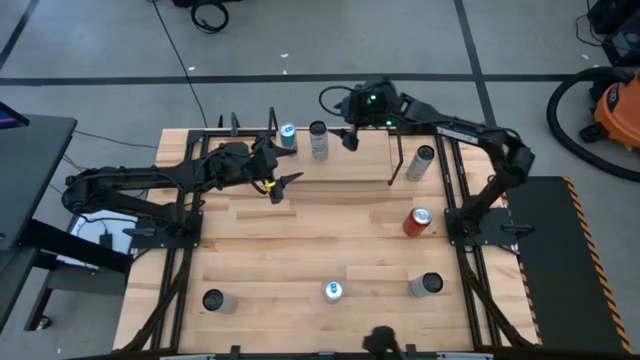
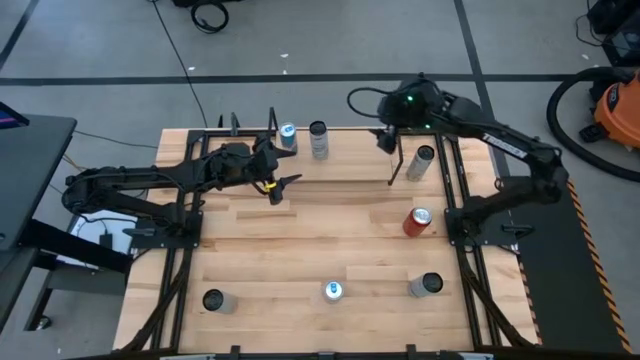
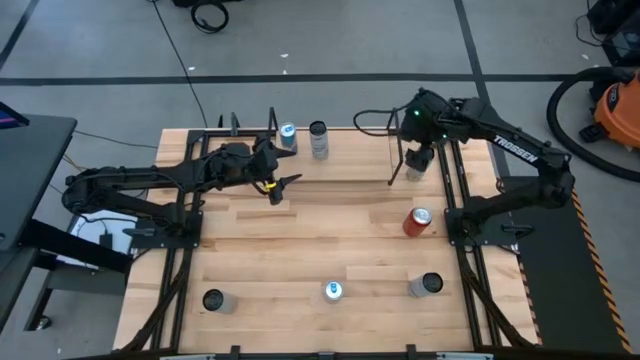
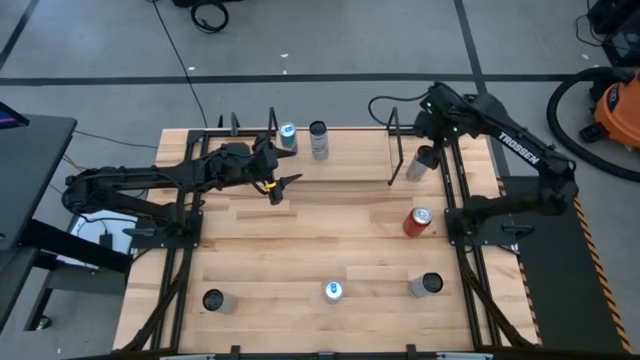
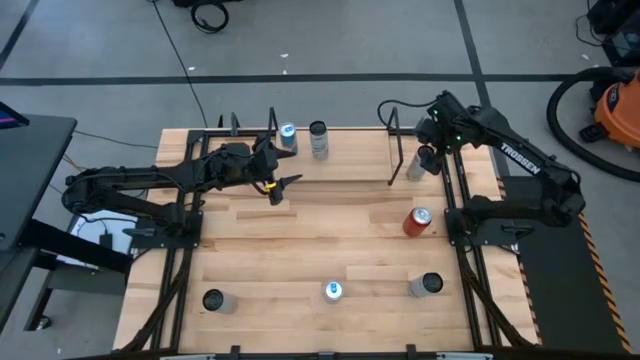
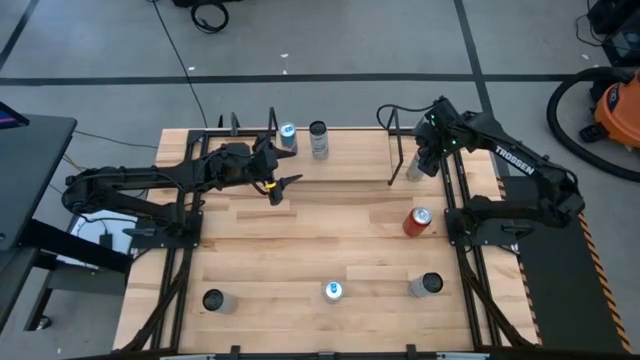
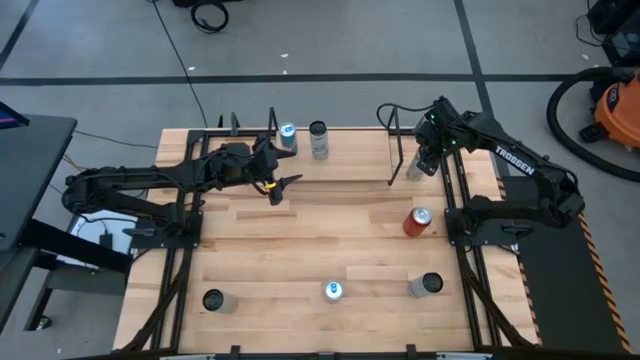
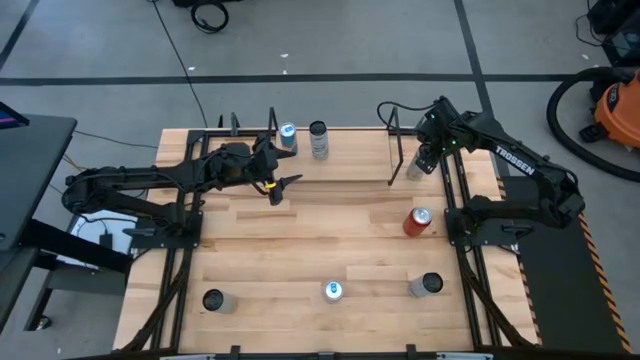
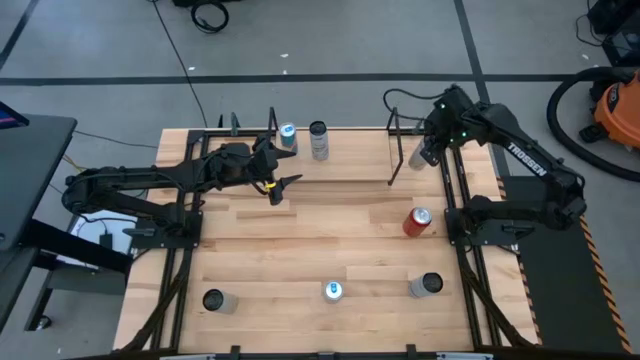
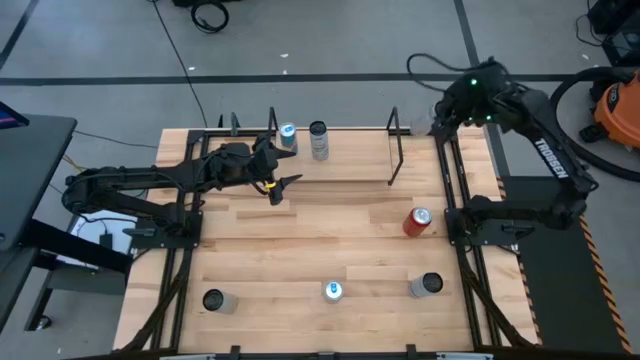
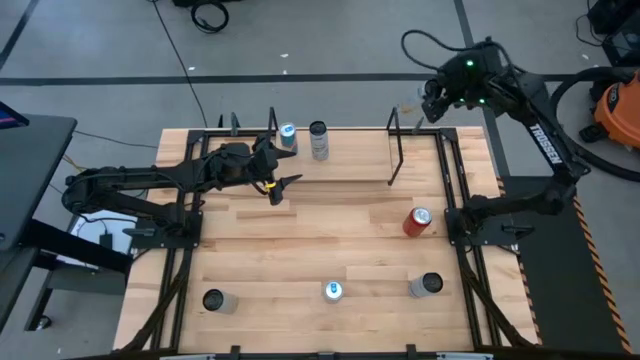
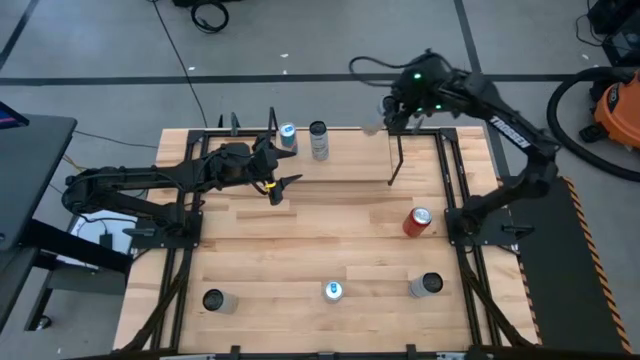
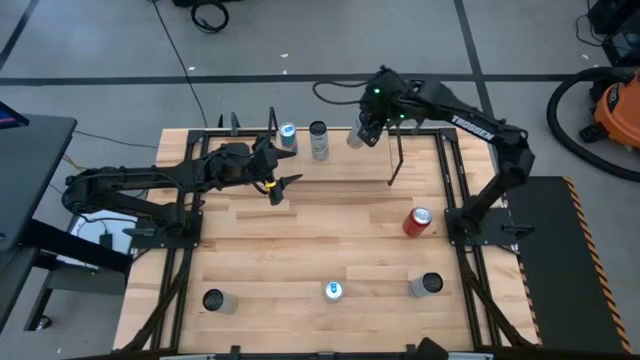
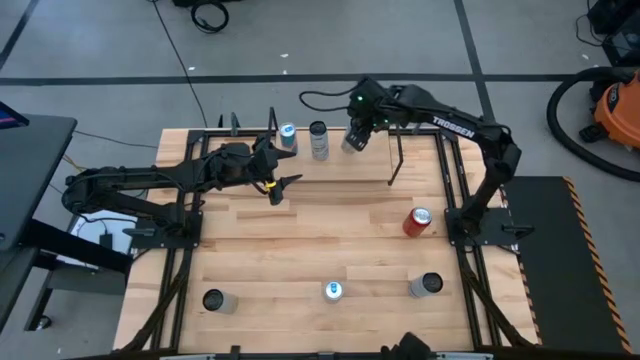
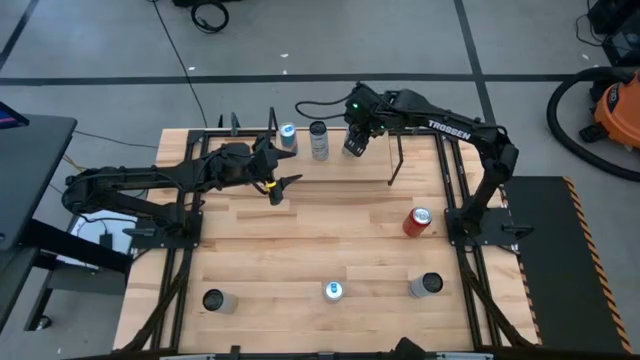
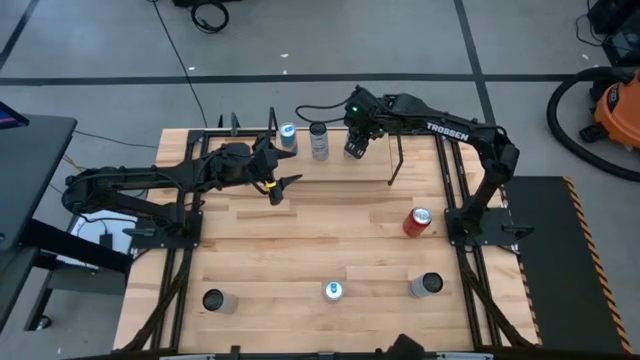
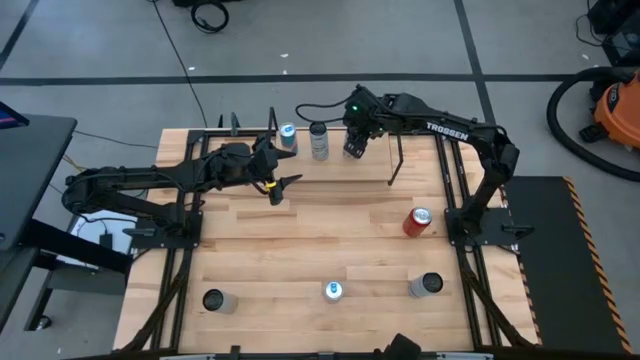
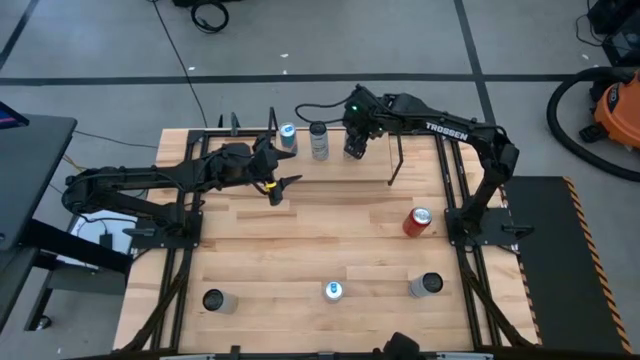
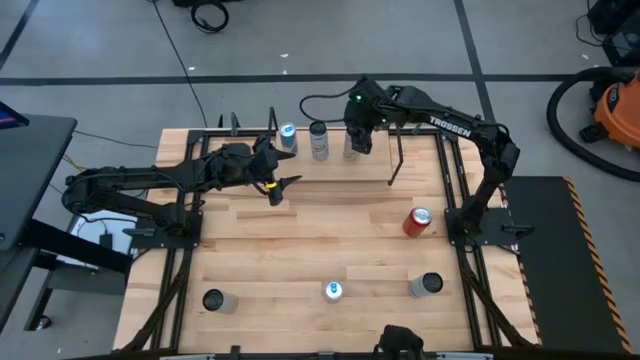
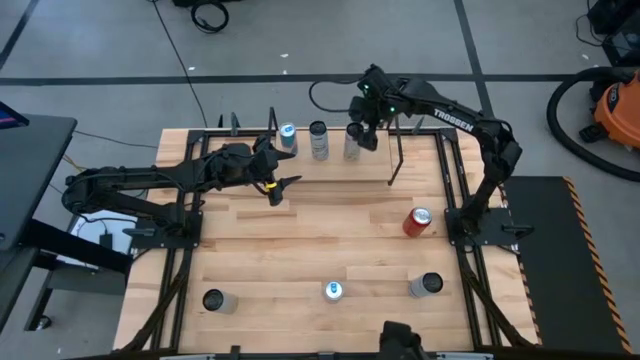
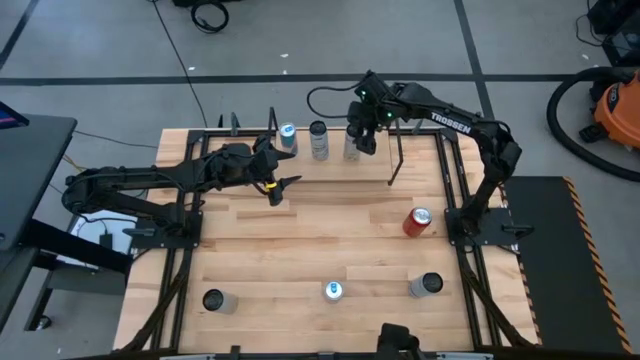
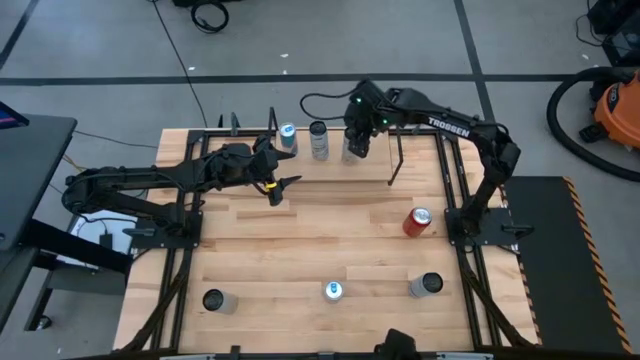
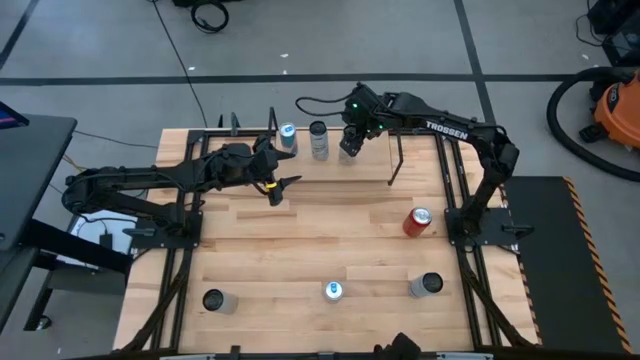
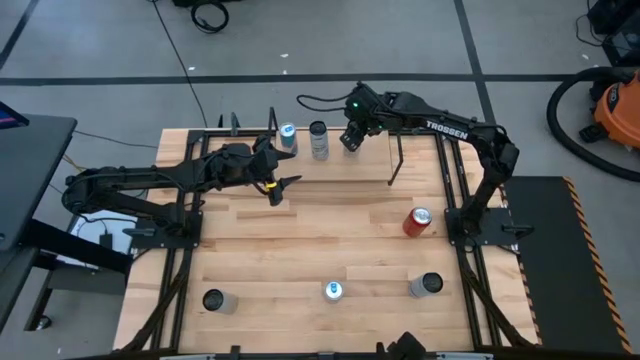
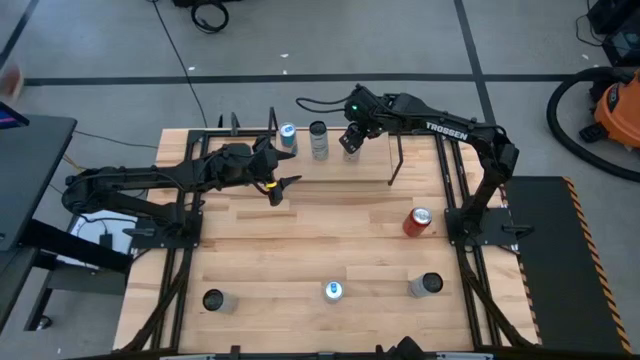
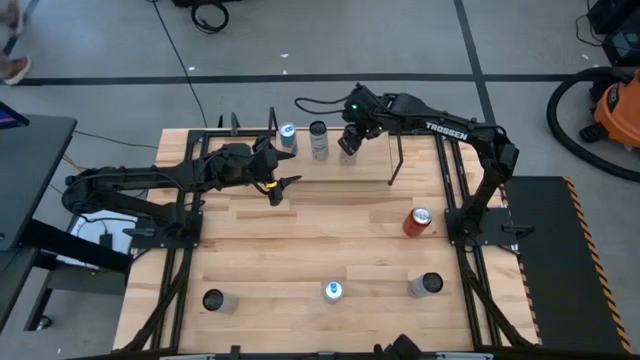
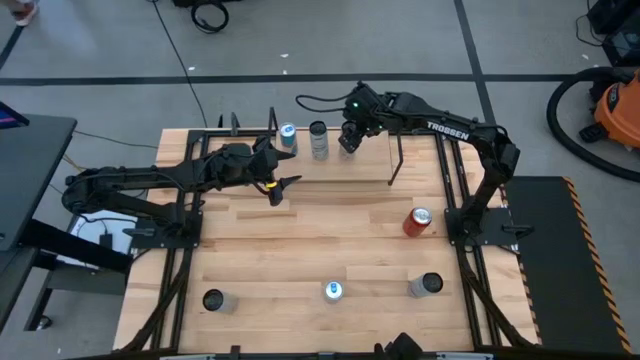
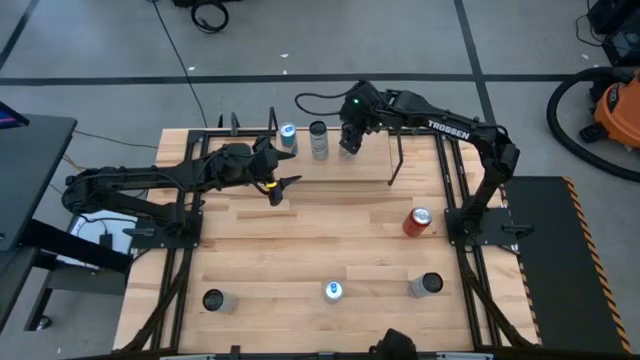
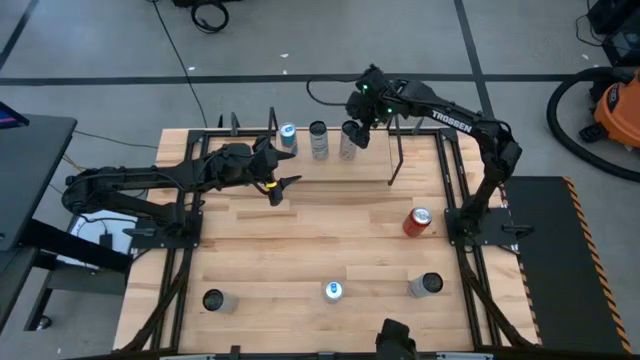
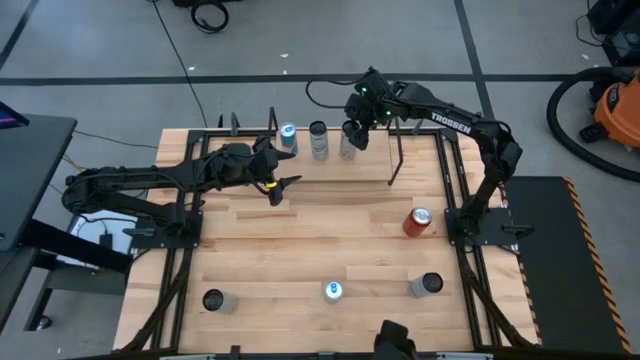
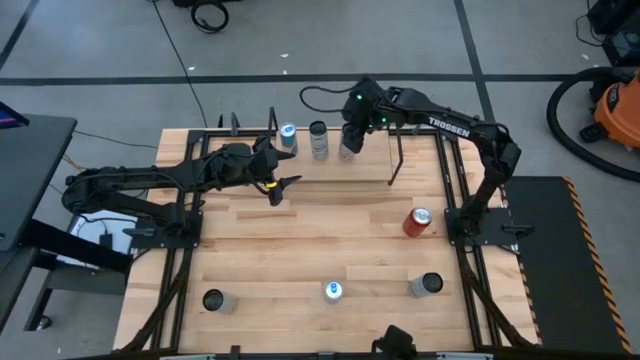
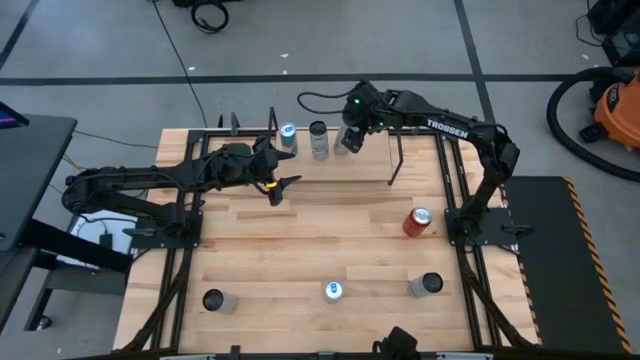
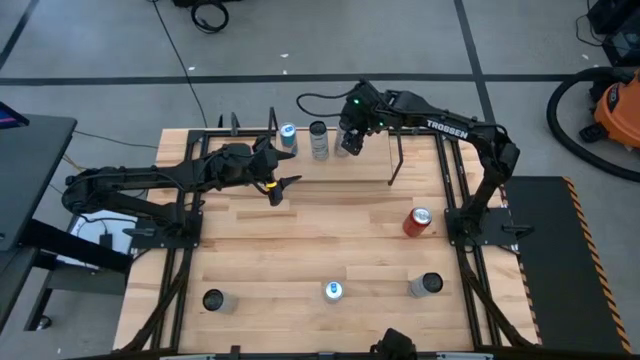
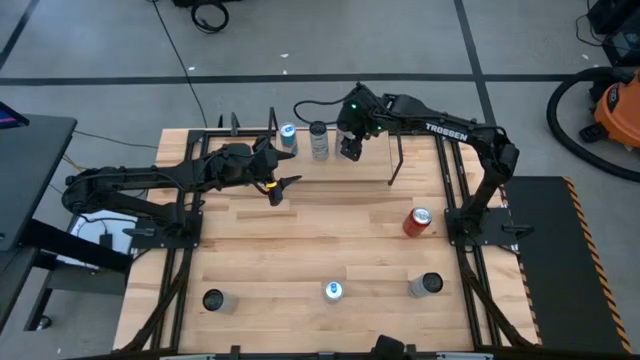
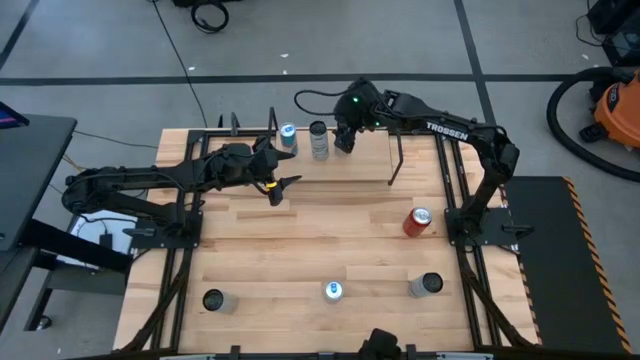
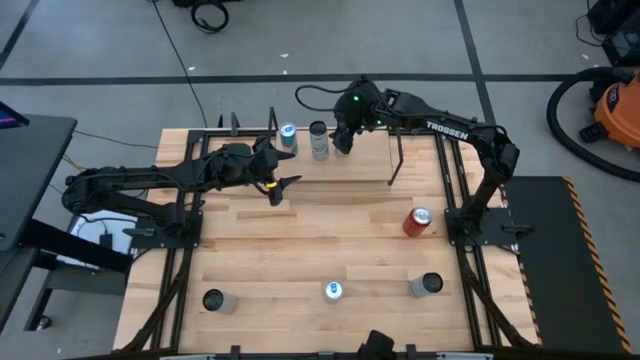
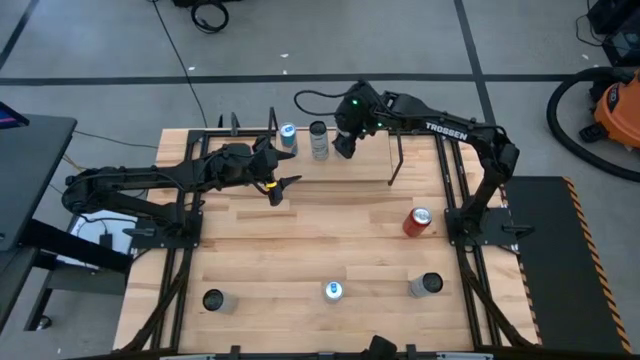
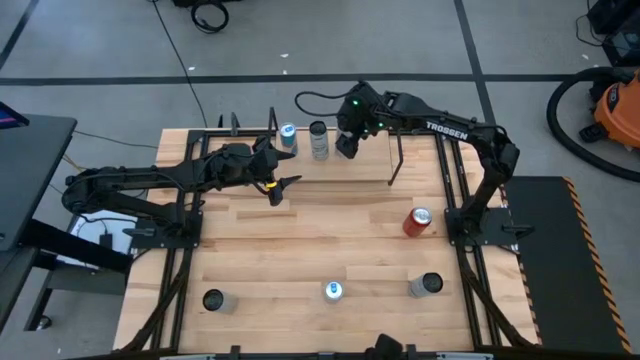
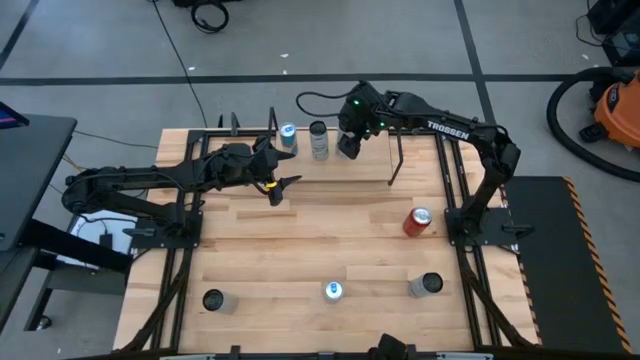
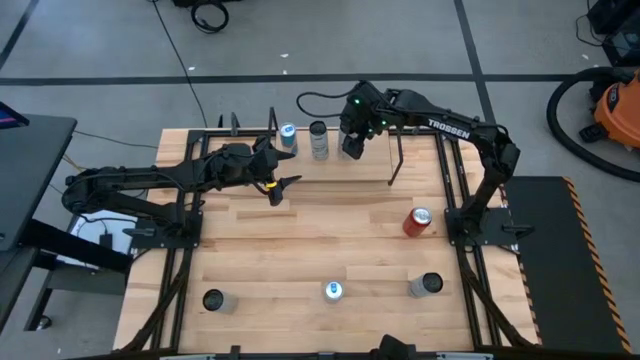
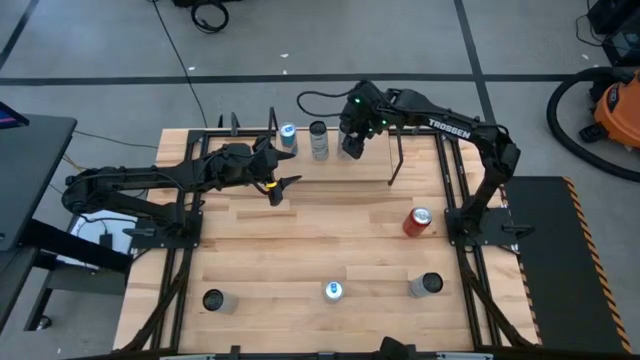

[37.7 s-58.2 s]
Task: Place canned beverage on shelf
Put the top white-yellow soda can on the shelf
